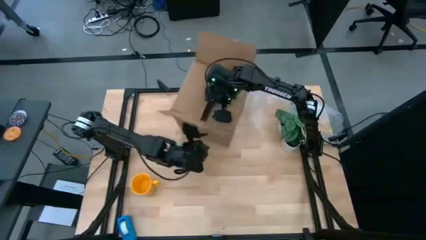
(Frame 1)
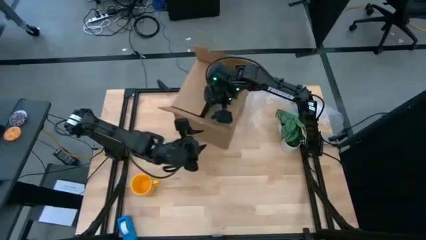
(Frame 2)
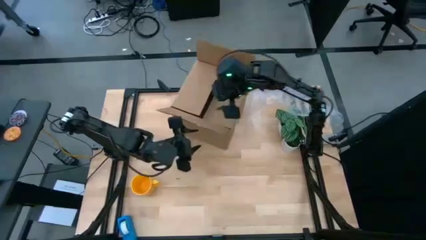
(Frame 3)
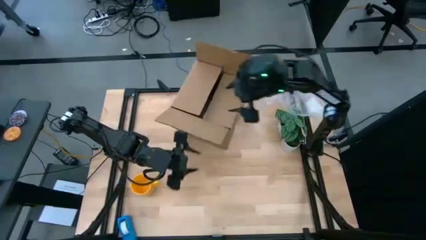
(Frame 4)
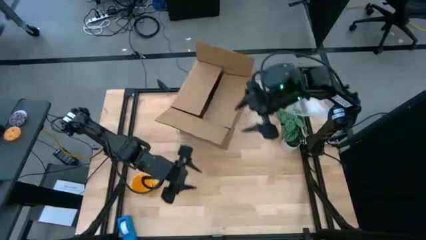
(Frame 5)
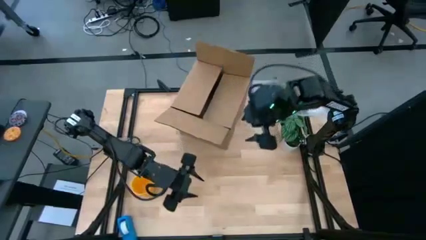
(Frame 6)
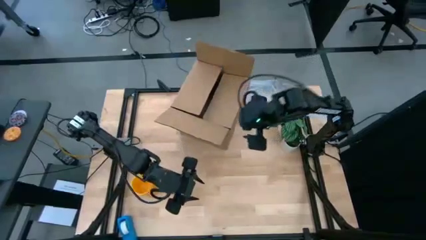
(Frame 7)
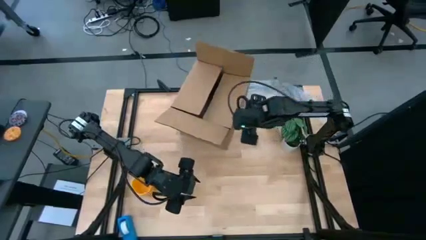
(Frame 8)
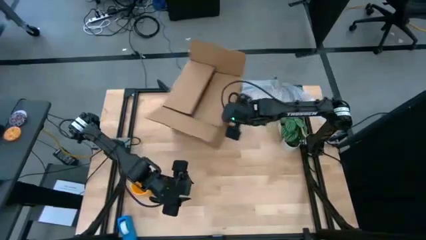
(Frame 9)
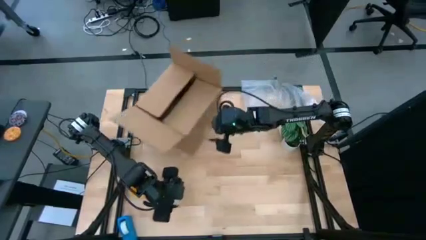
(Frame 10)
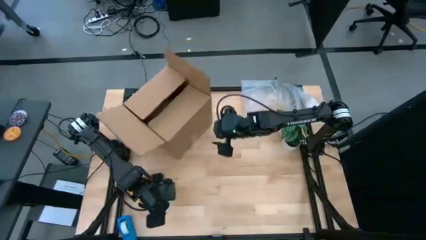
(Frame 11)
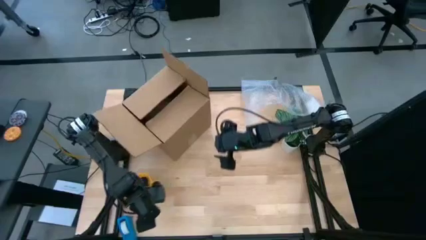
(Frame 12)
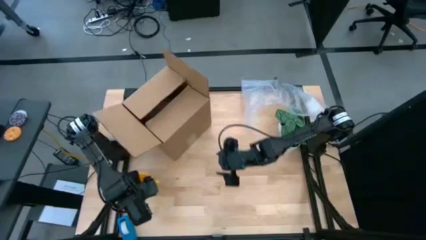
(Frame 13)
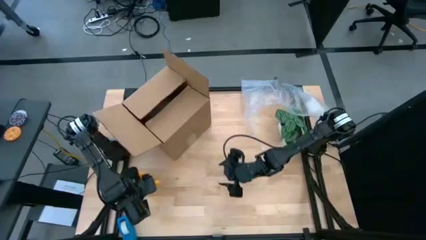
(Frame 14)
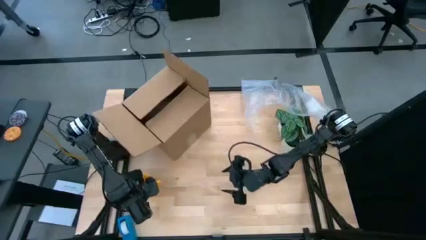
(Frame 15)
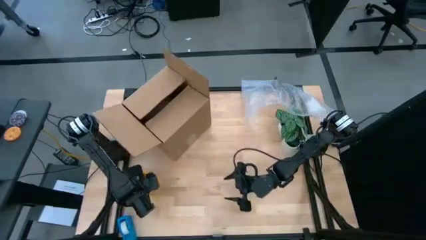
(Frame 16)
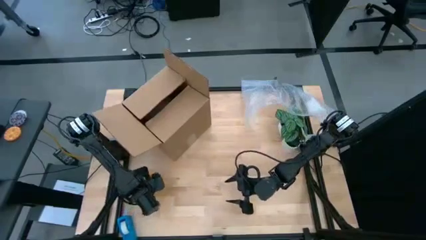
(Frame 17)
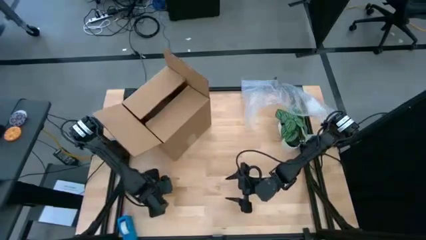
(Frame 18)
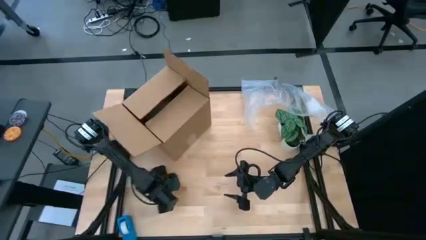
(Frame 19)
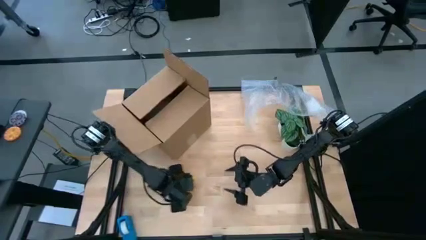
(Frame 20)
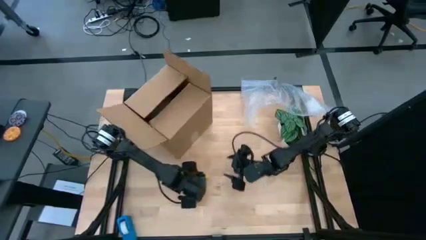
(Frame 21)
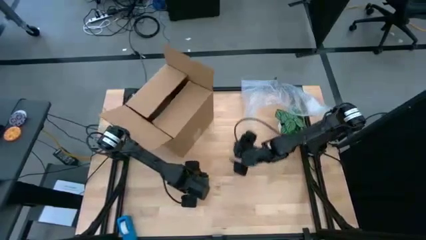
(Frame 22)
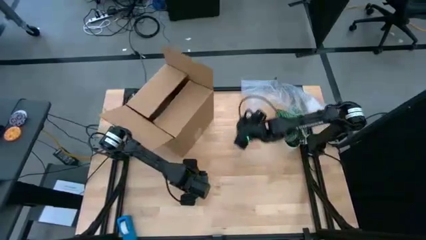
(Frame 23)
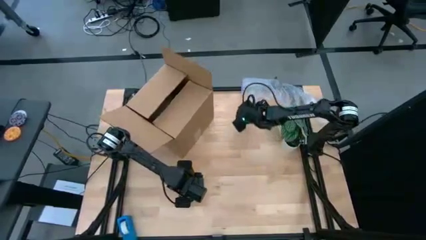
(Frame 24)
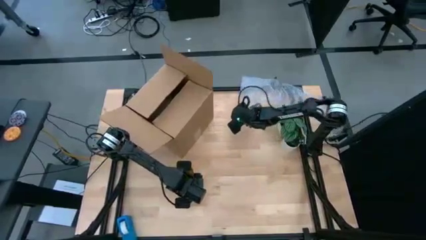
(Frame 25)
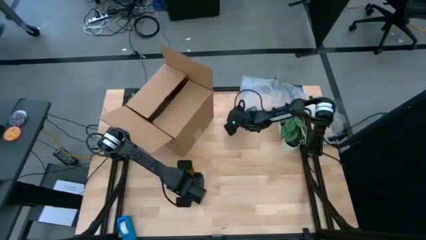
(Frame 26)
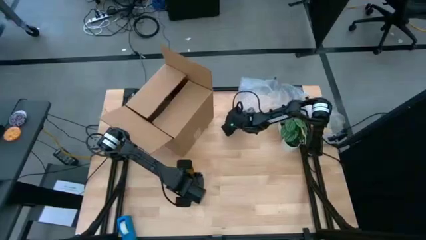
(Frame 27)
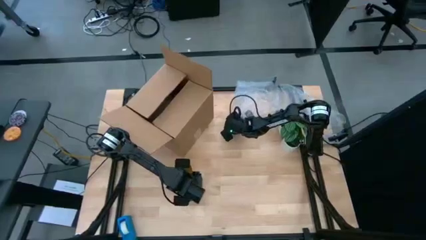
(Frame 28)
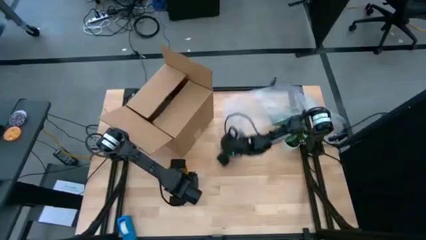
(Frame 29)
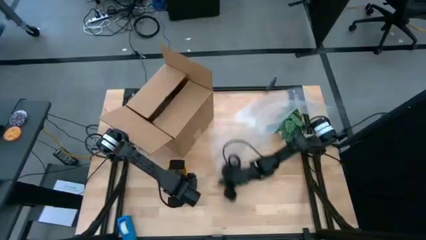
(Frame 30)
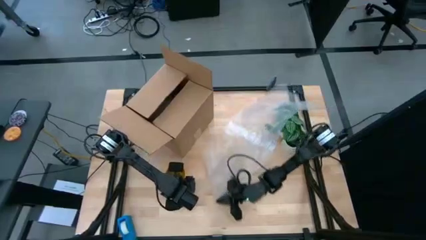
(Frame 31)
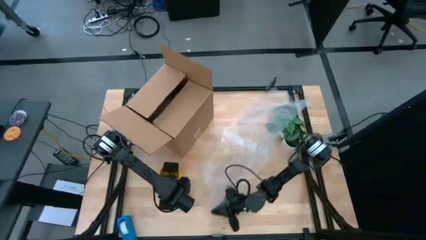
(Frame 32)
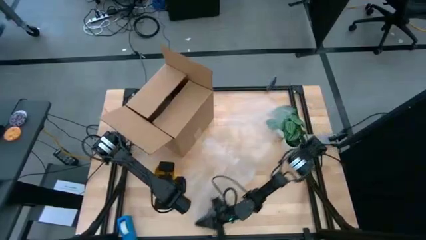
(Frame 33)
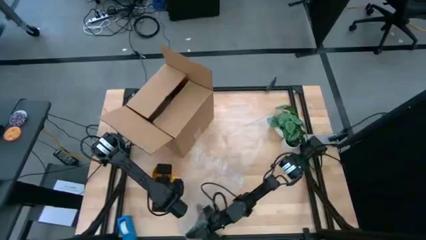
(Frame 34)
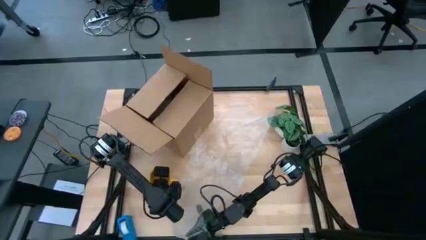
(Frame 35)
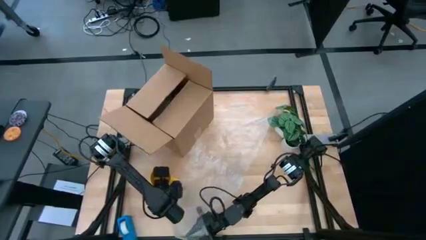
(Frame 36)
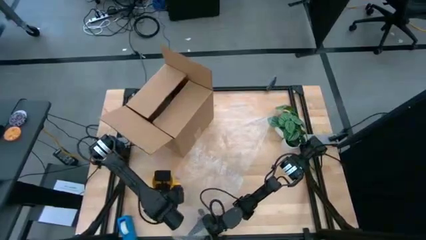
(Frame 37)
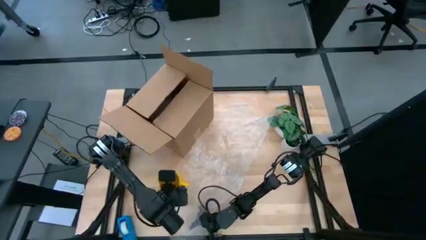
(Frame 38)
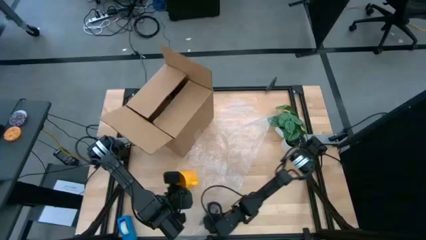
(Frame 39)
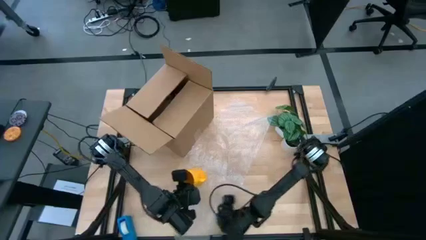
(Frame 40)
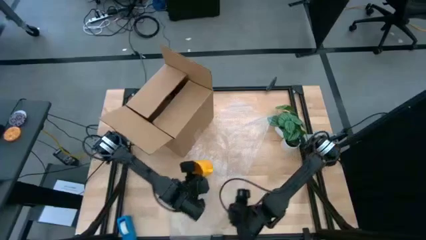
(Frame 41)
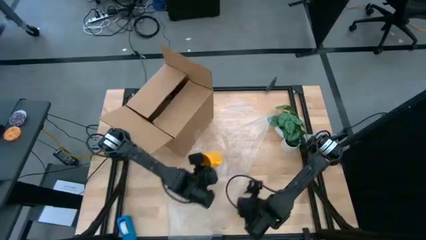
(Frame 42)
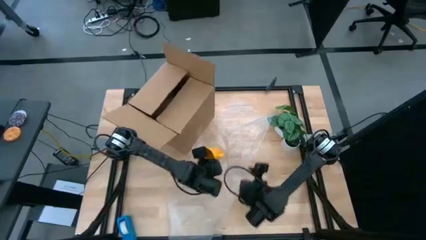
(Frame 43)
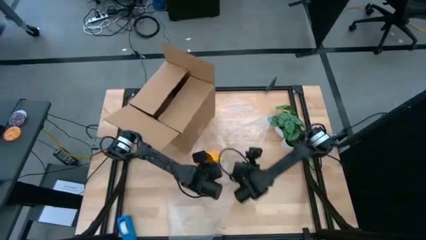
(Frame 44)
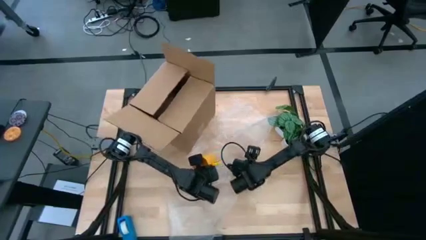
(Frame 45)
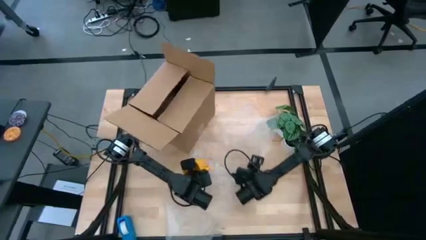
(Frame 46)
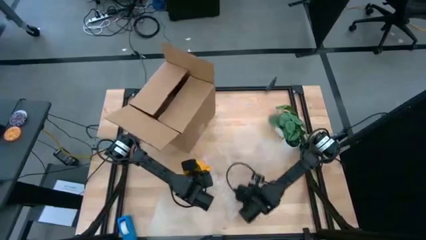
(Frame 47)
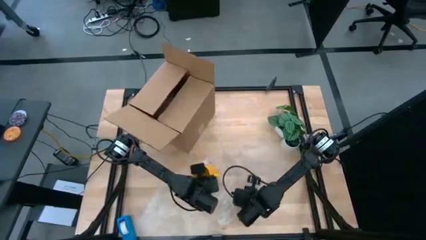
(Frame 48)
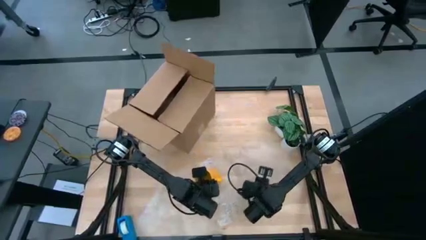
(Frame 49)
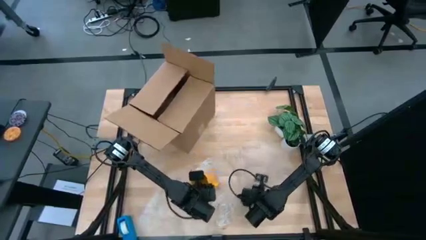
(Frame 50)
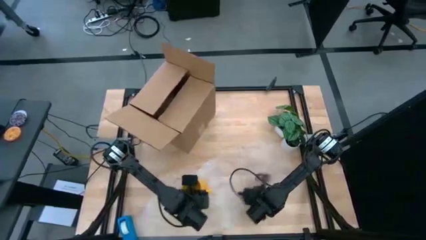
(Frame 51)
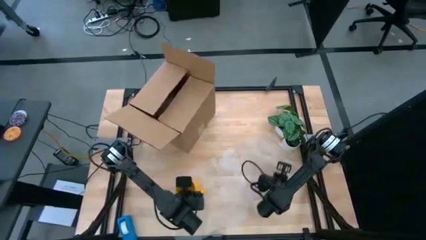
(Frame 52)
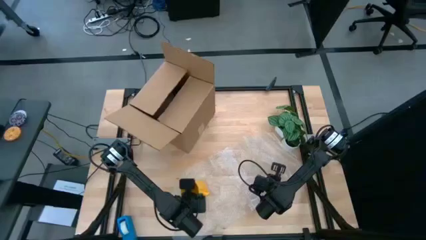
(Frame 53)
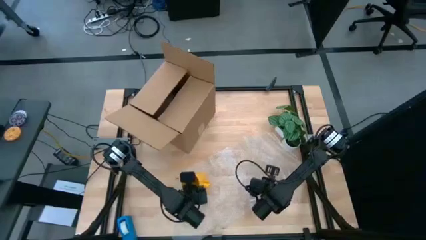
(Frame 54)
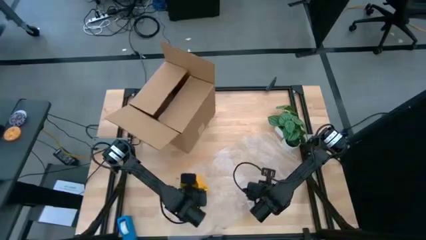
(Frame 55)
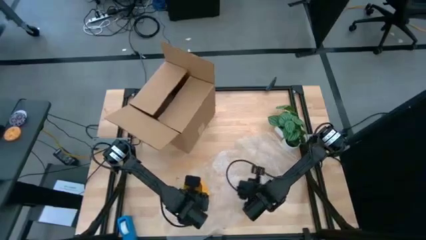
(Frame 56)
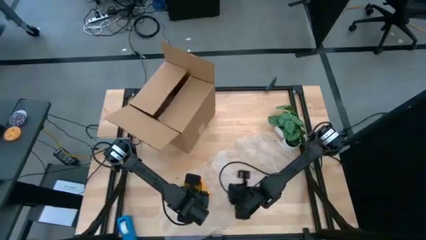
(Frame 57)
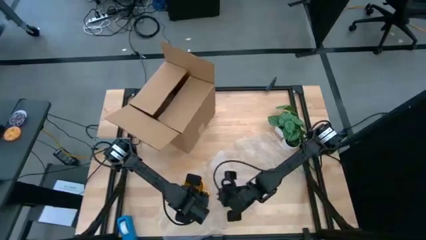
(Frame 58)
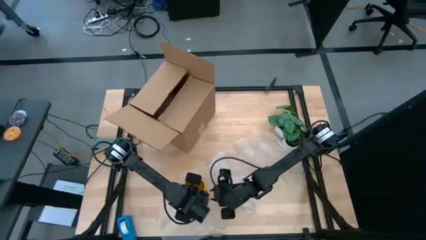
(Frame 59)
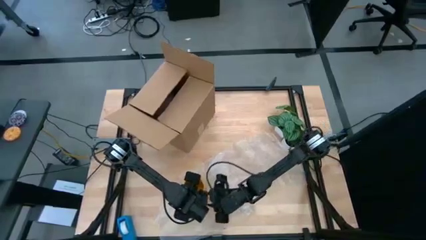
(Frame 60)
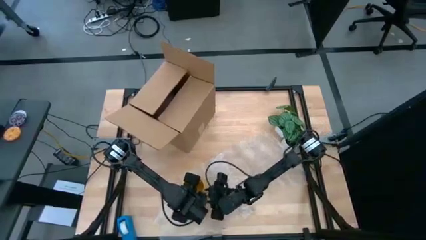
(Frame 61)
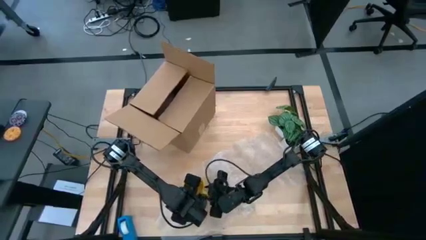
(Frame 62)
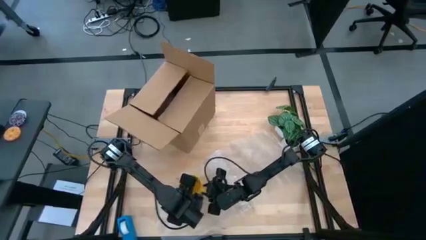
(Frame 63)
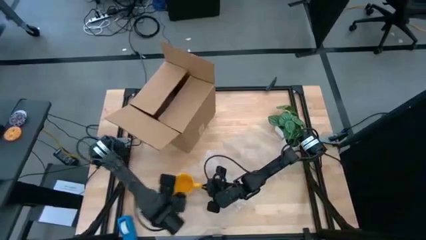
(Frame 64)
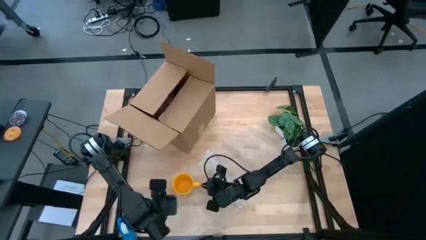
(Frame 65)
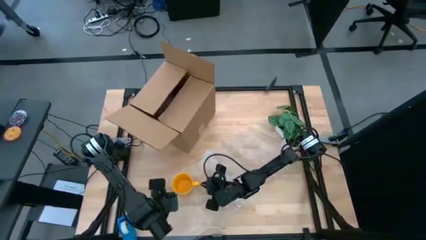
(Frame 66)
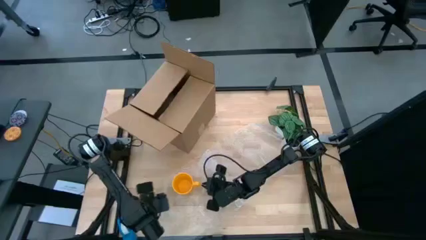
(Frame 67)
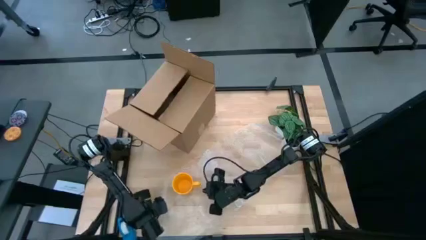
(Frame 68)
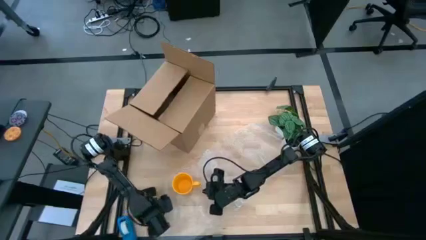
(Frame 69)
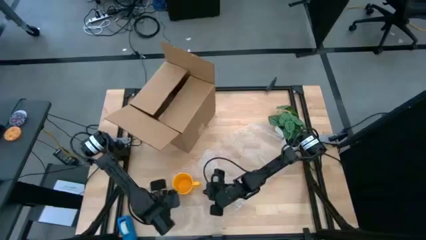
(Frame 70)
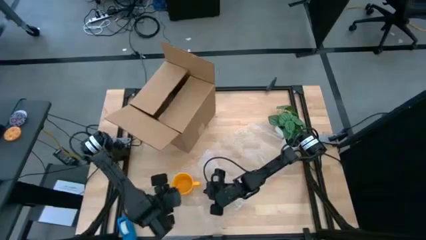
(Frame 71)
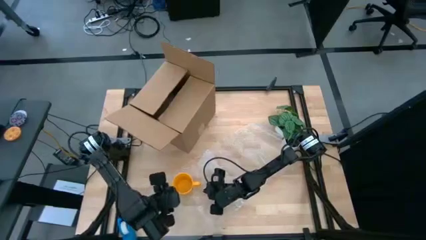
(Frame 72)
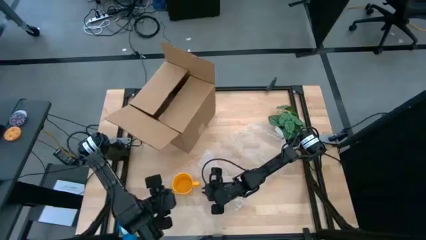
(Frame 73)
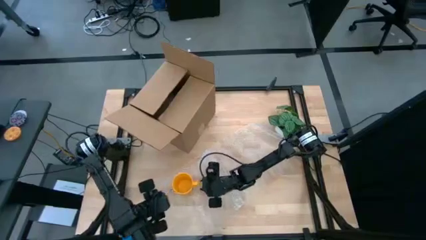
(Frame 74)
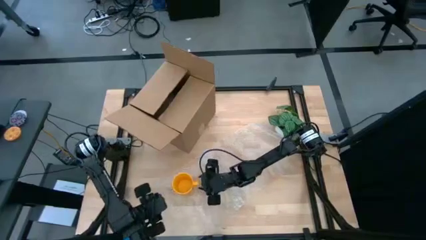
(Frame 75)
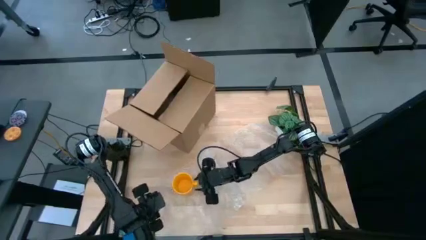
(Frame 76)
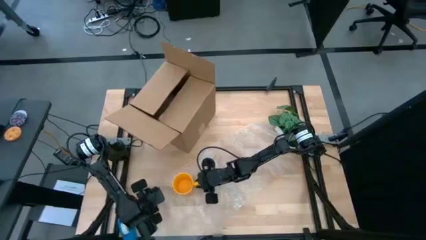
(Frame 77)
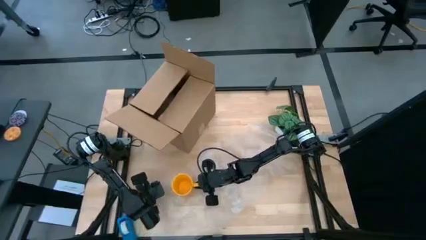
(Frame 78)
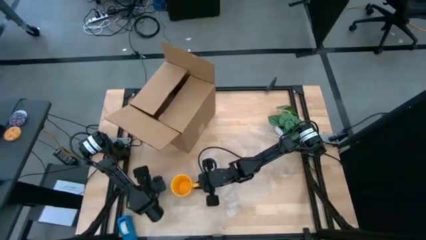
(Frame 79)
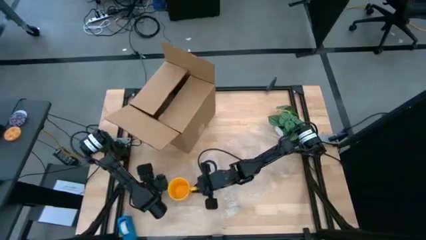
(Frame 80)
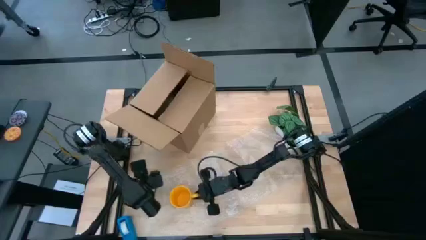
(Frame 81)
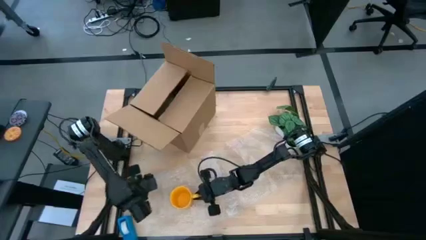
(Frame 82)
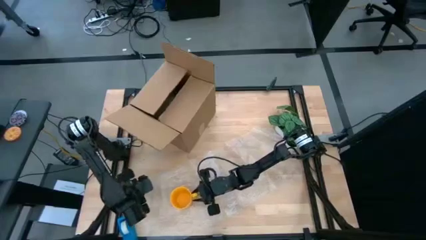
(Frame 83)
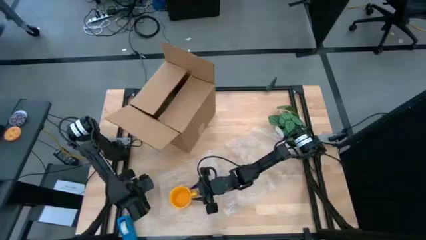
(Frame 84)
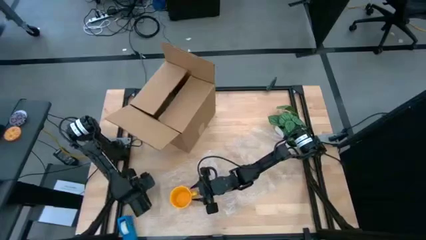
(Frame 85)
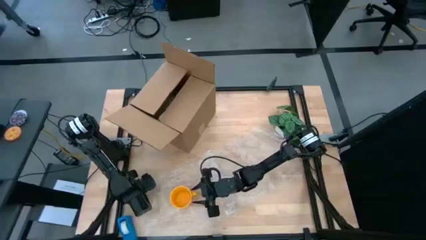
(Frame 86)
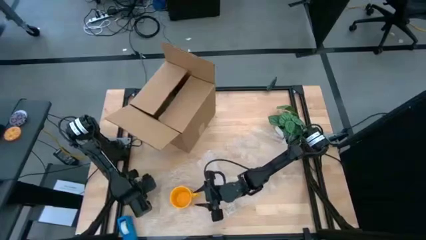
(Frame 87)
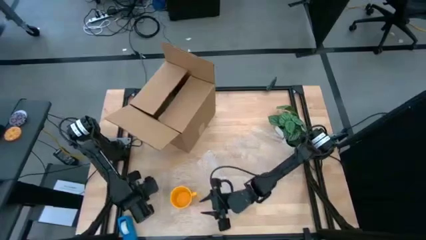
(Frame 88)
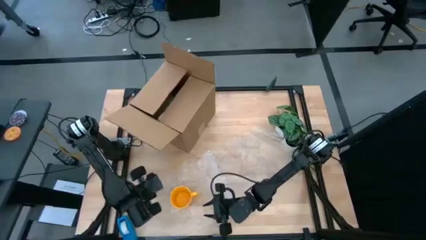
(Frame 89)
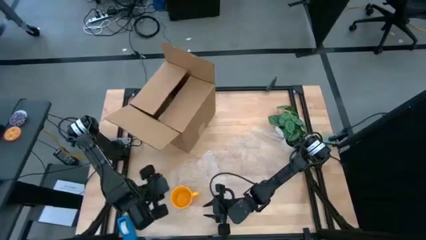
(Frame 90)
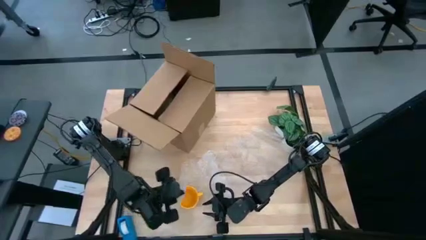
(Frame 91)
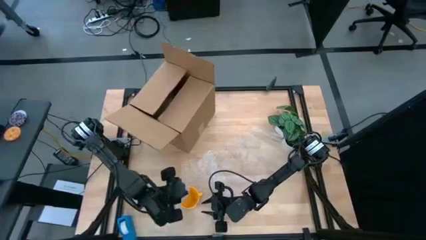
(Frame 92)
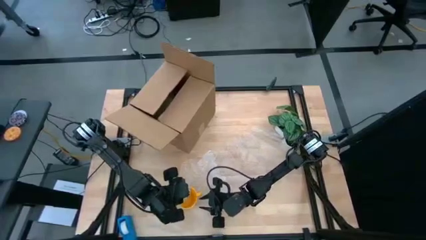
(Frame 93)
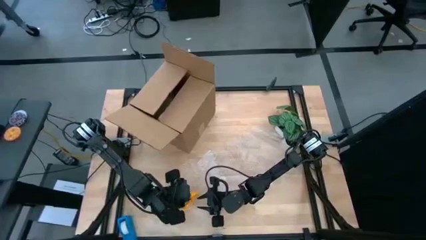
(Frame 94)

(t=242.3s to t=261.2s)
Task: wrap mug
Wrap the yellow mug with the bubble wrap
